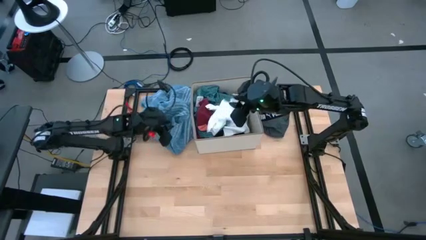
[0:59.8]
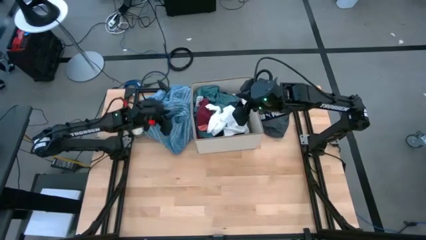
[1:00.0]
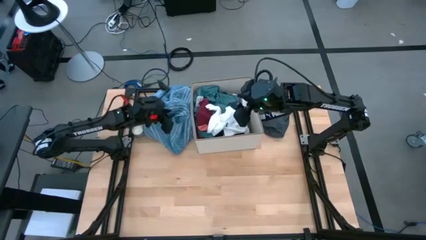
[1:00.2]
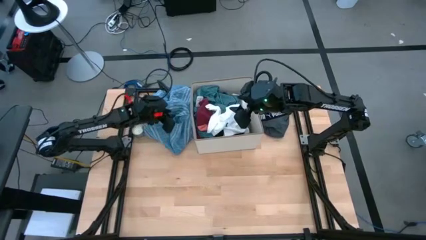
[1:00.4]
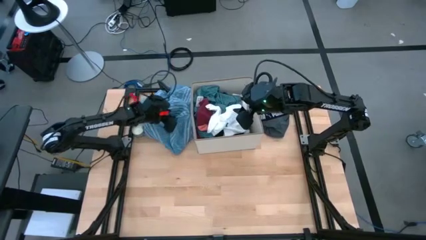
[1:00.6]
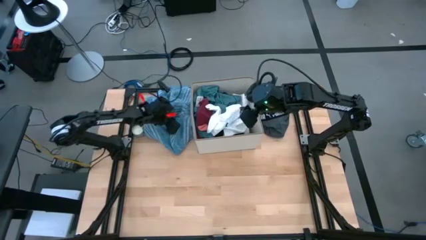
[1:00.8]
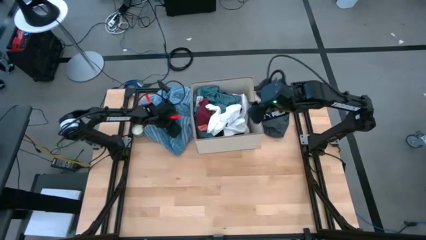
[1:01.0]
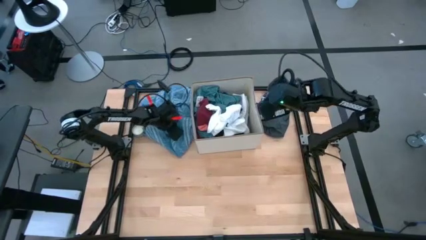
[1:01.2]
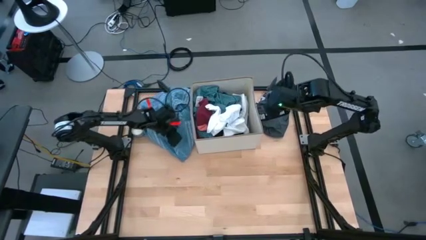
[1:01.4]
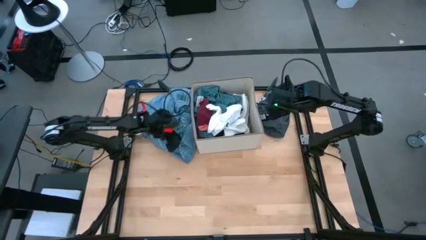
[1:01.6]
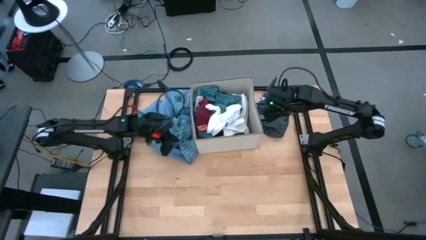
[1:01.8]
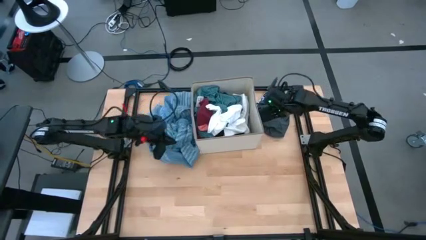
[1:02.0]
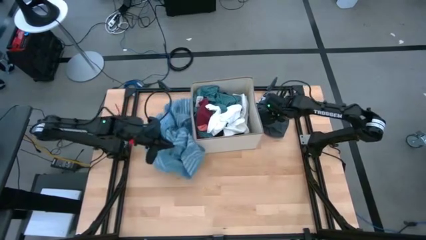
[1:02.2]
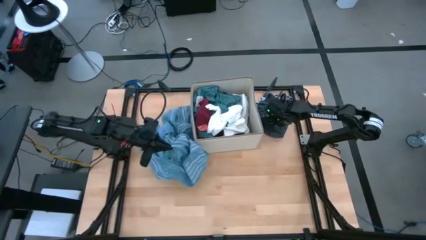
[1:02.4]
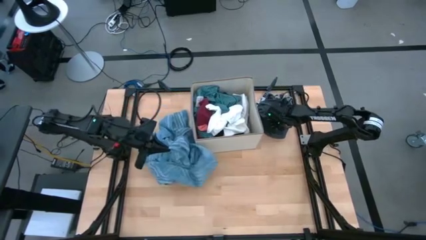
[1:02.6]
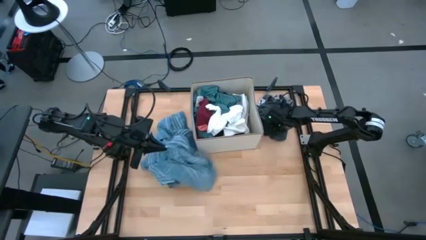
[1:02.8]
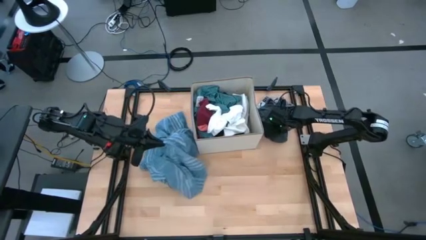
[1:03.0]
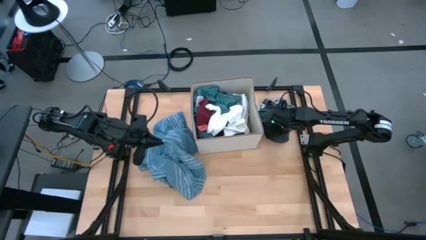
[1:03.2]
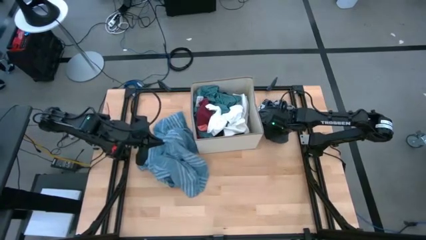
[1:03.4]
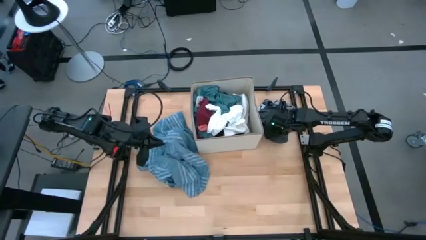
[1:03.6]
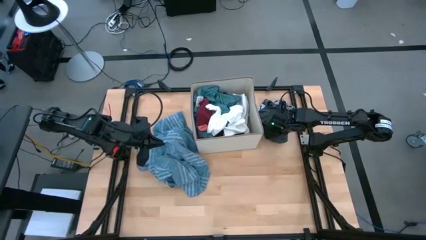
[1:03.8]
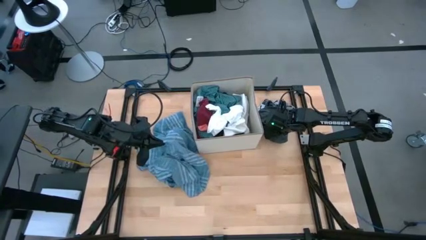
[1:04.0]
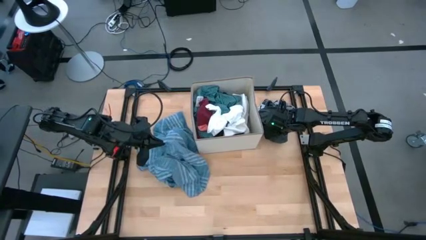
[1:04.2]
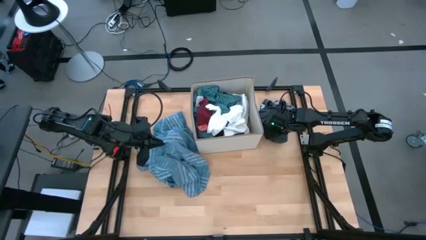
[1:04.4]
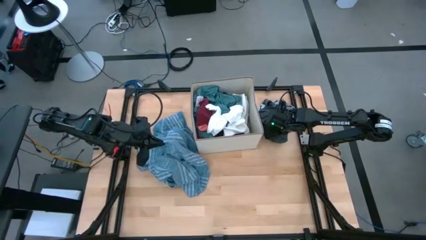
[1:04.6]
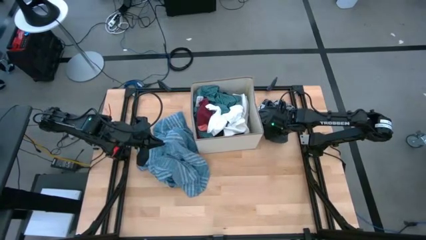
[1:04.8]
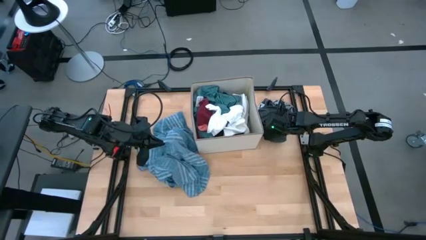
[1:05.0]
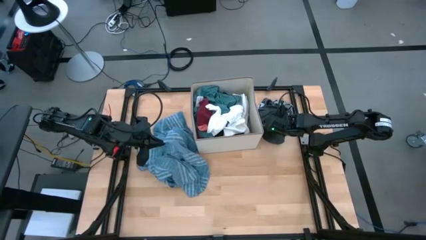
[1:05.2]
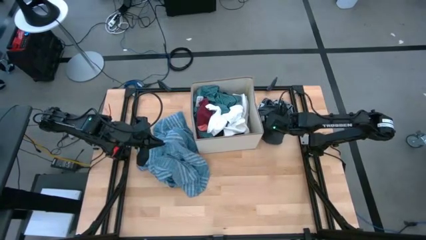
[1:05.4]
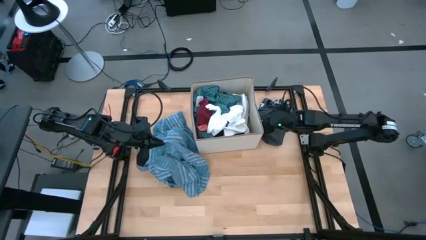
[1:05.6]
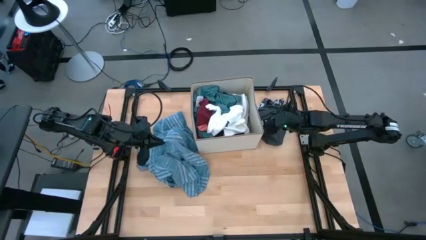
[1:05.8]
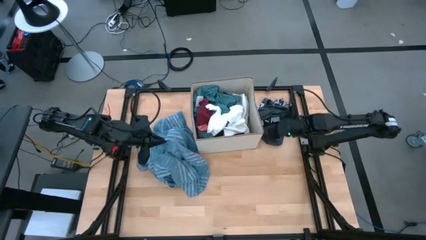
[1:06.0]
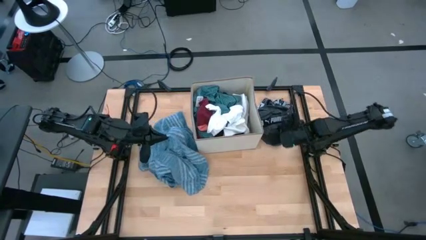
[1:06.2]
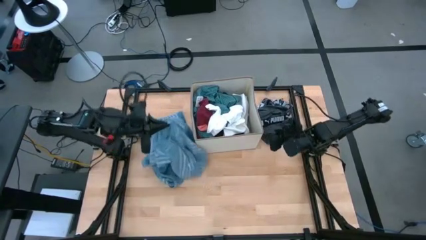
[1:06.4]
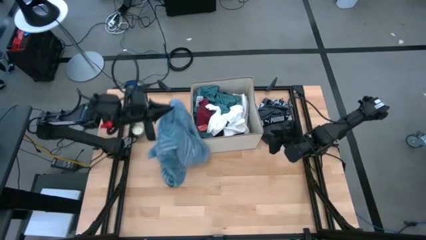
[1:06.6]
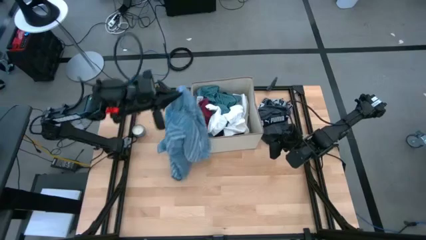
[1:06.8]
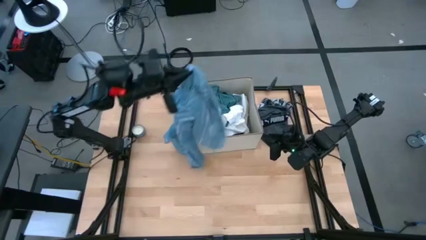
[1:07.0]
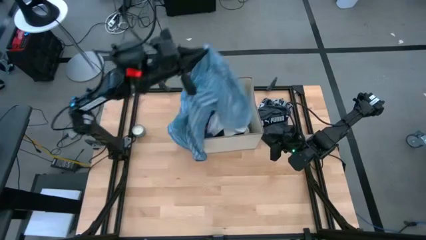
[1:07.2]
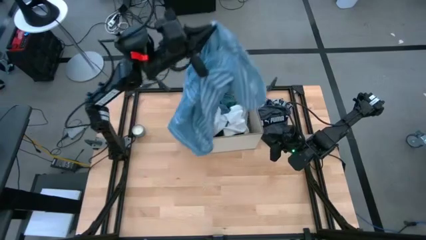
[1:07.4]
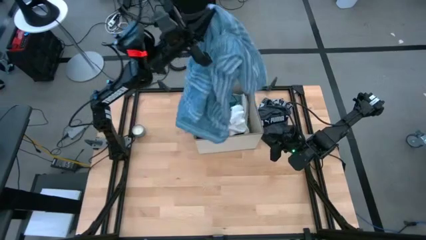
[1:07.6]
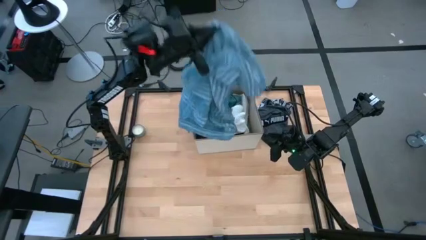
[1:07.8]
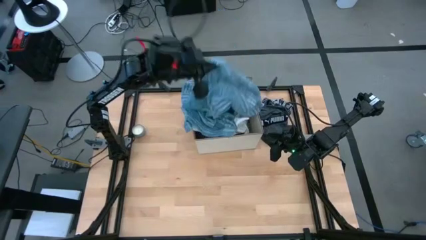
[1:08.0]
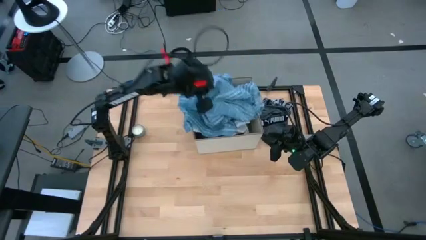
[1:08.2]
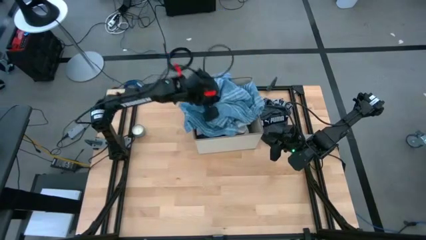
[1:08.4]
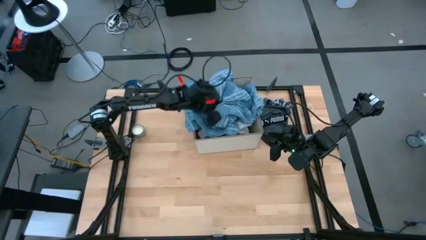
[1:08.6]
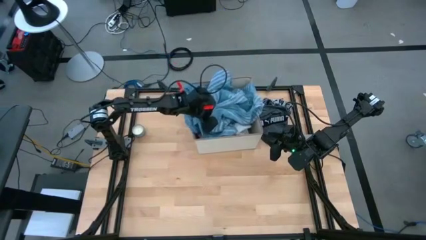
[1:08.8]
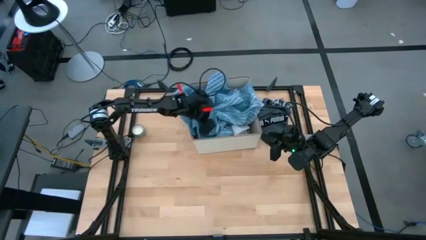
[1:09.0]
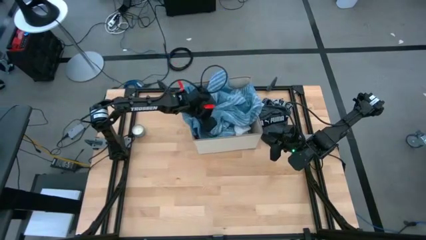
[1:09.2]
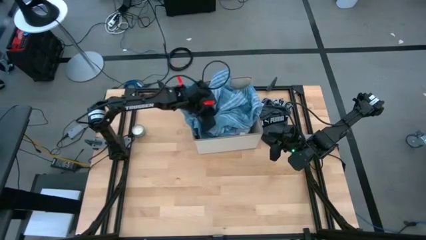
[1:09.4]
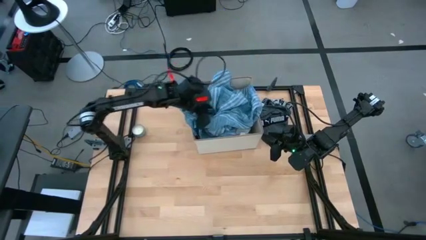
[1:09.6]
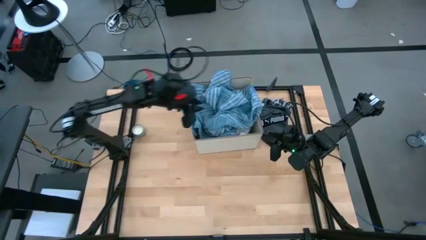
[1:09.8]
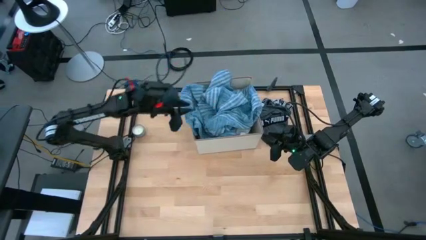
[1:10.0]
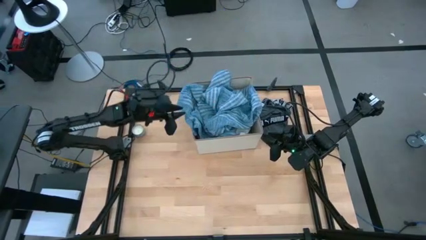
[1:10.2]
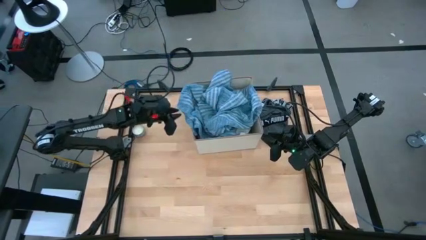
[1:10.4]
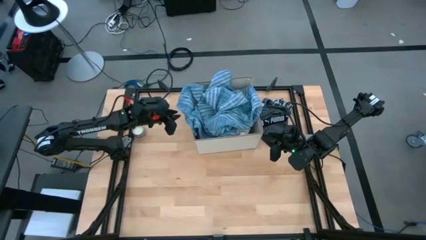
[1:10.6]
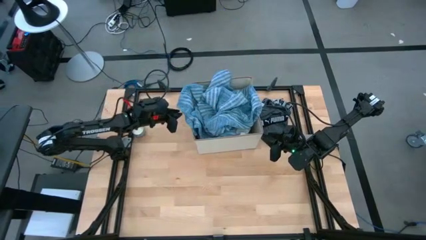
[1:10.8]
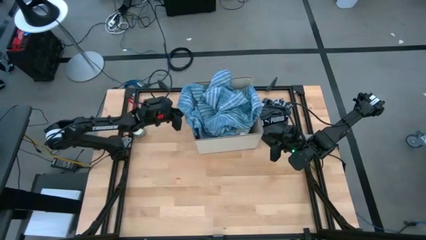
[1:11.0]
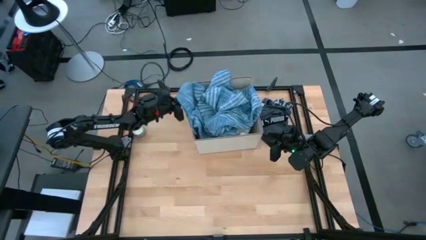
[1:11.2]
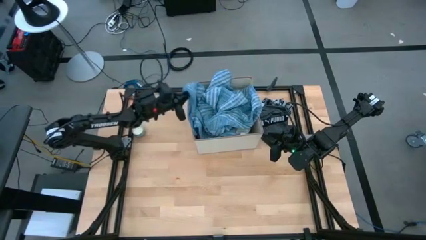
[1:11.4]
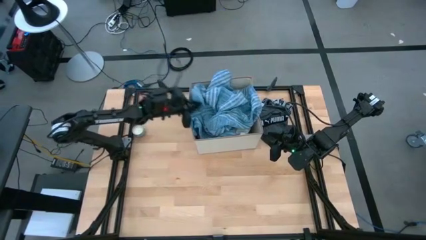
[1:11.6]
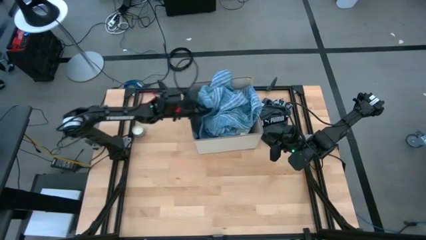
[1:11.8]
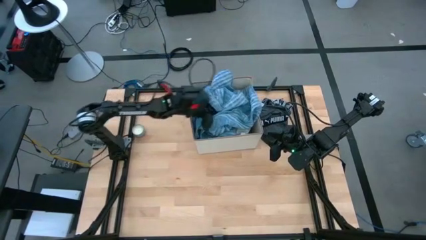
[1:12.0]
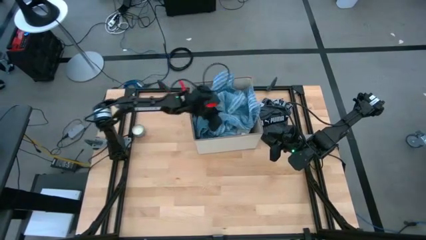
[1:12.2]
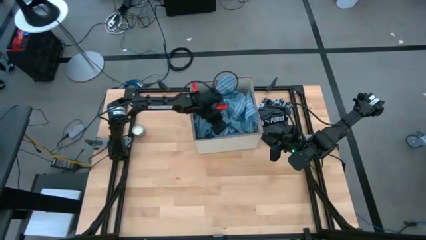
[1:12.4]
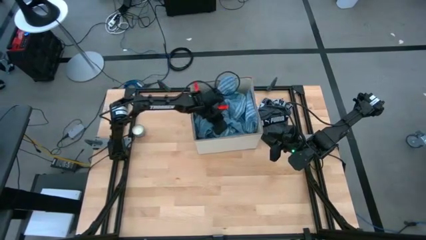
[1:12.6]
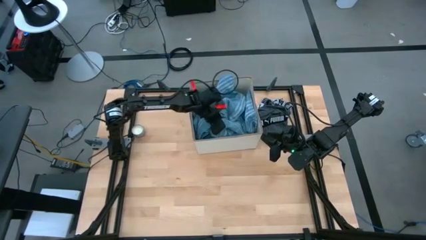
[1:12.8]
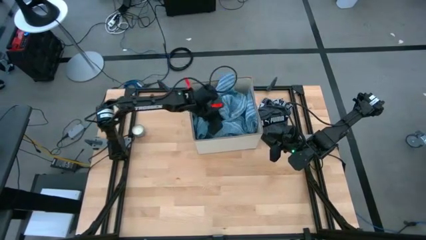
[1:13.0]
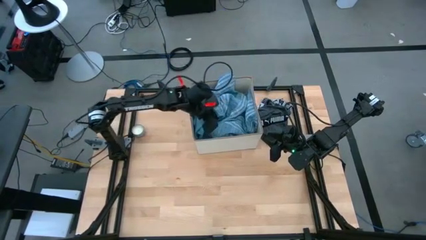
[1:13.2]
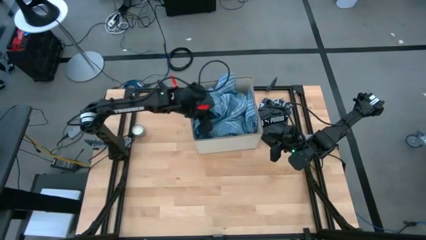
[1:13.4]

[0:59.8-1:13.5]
Task: Sort clothes
Put the blue towel into the bin
